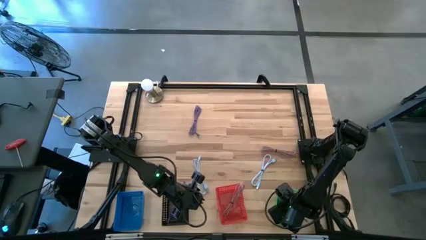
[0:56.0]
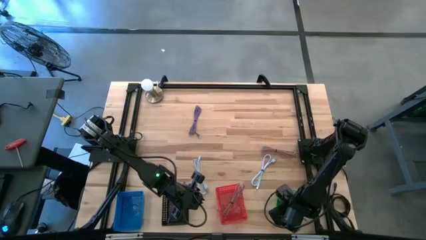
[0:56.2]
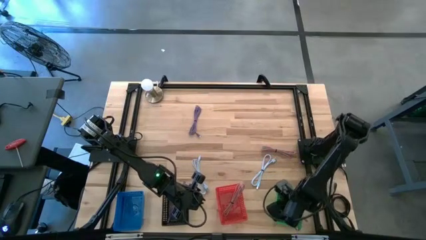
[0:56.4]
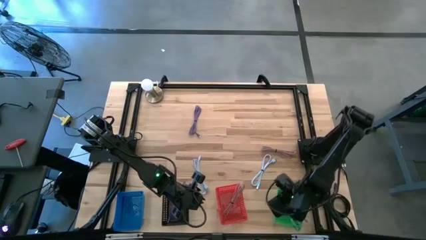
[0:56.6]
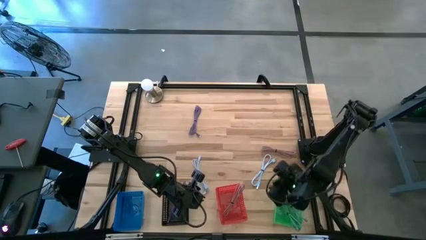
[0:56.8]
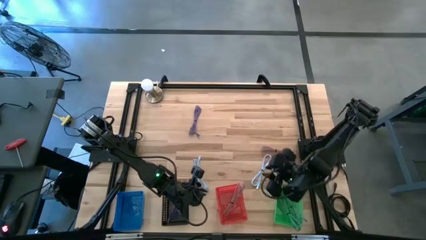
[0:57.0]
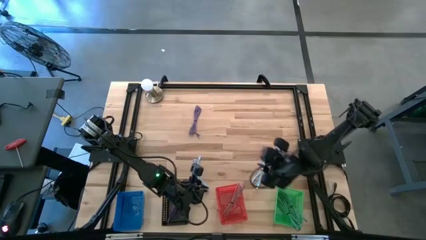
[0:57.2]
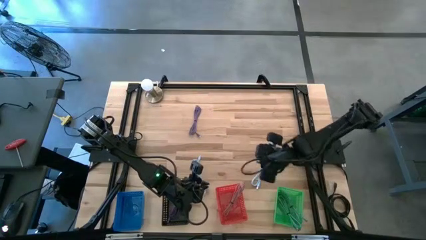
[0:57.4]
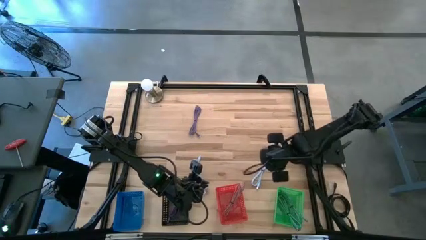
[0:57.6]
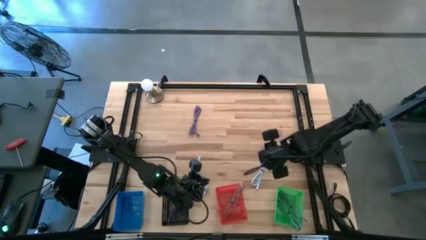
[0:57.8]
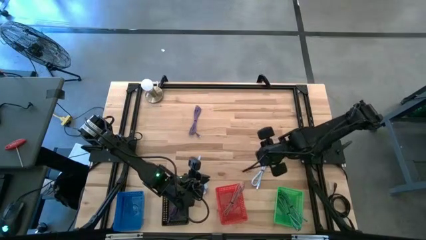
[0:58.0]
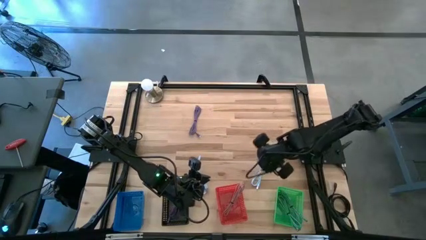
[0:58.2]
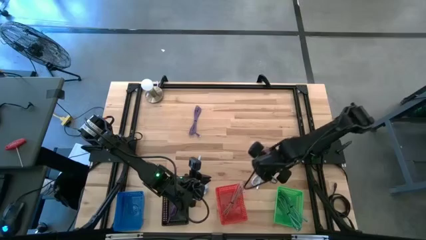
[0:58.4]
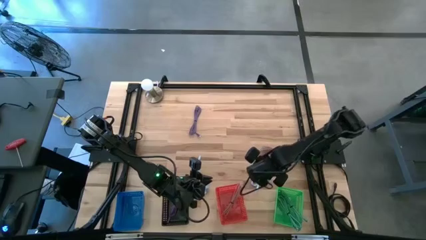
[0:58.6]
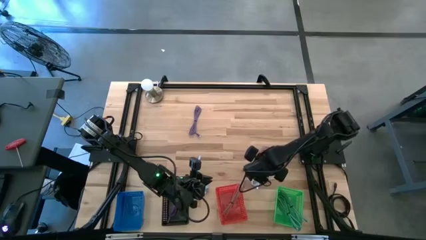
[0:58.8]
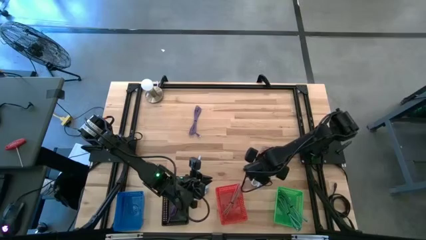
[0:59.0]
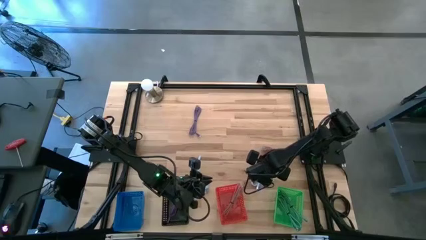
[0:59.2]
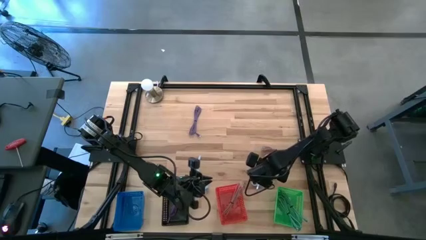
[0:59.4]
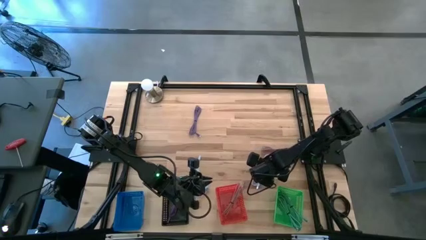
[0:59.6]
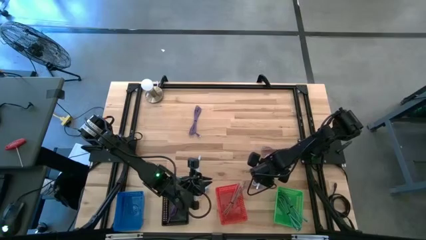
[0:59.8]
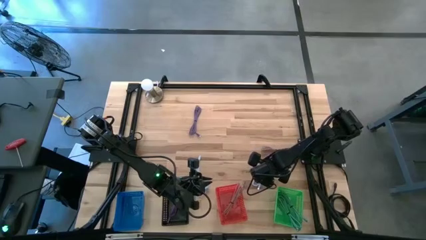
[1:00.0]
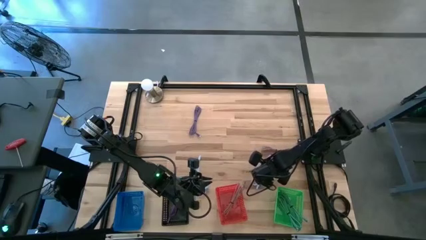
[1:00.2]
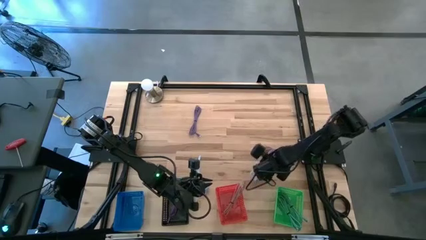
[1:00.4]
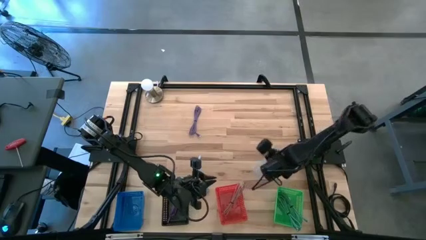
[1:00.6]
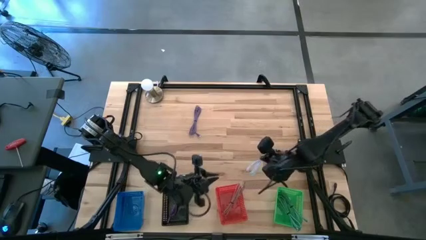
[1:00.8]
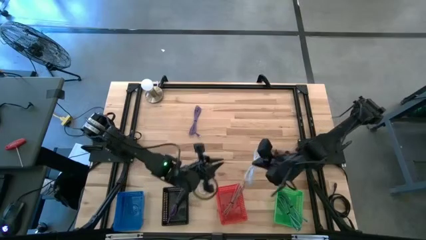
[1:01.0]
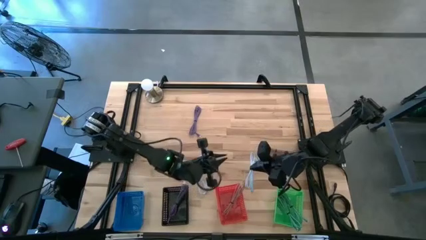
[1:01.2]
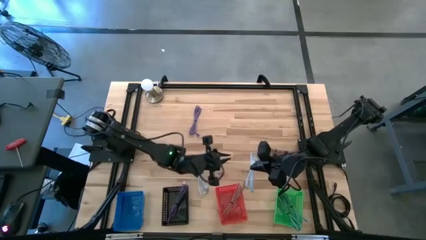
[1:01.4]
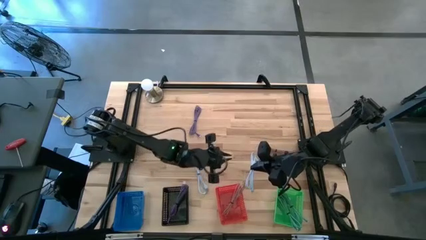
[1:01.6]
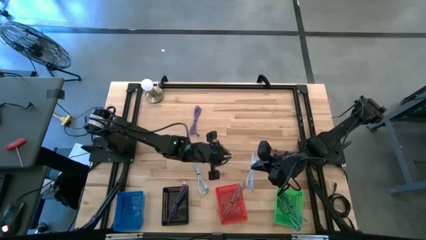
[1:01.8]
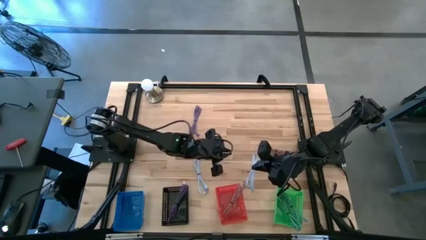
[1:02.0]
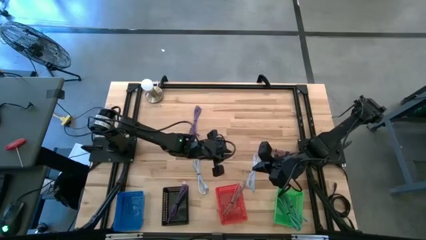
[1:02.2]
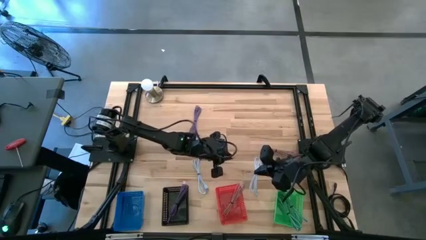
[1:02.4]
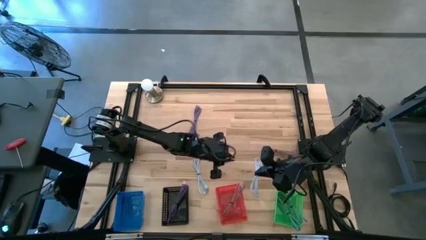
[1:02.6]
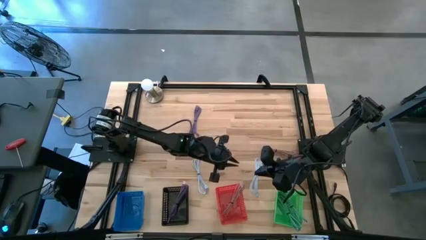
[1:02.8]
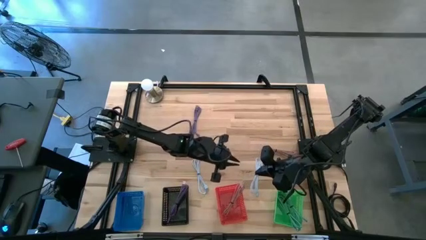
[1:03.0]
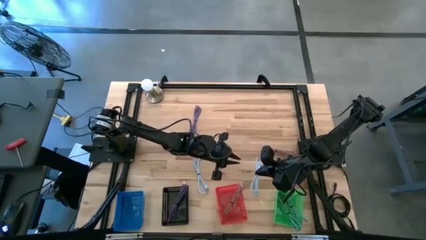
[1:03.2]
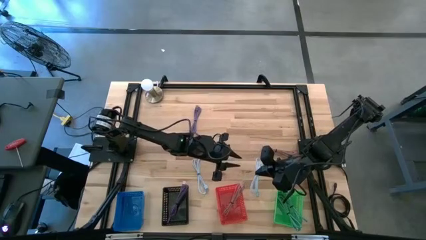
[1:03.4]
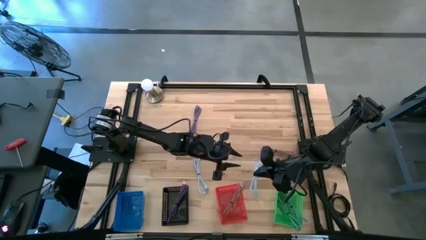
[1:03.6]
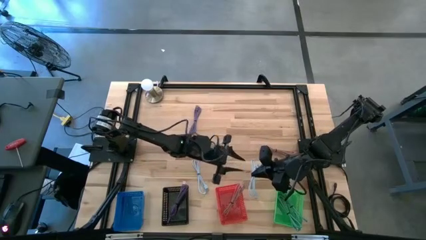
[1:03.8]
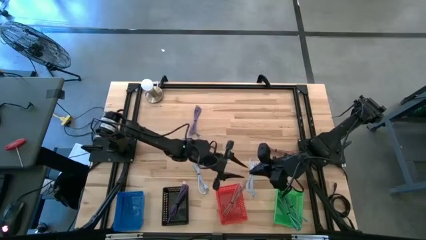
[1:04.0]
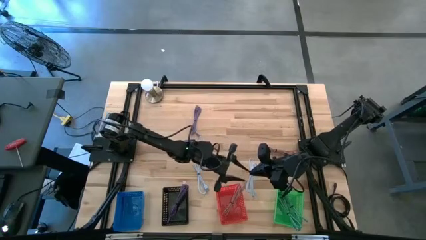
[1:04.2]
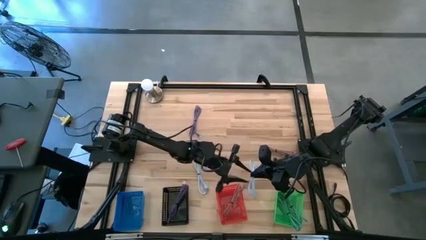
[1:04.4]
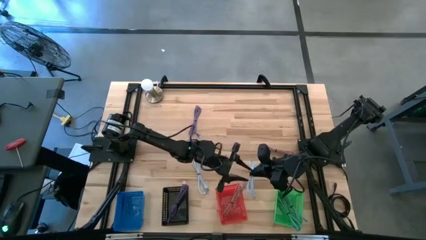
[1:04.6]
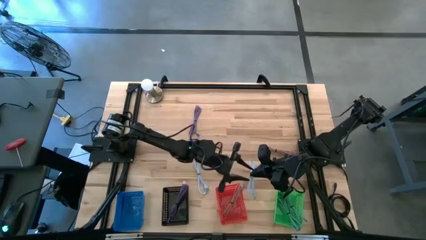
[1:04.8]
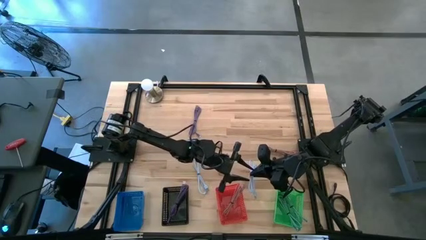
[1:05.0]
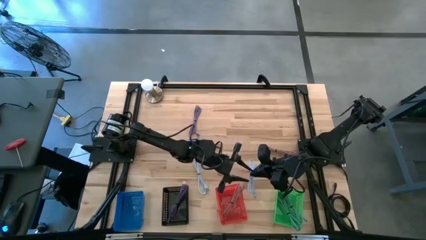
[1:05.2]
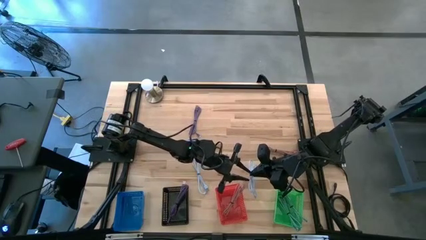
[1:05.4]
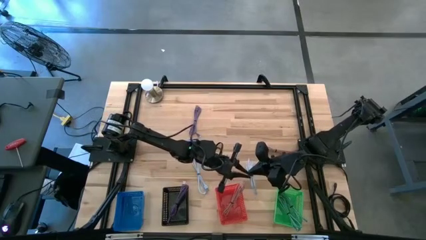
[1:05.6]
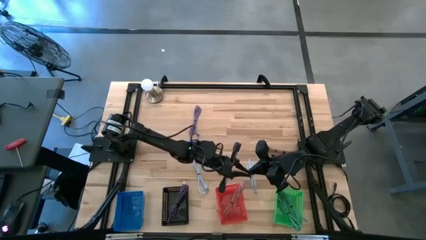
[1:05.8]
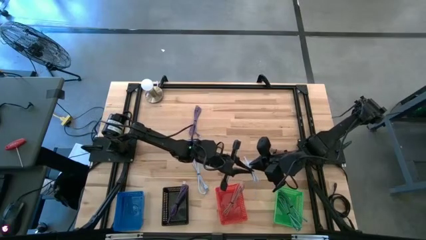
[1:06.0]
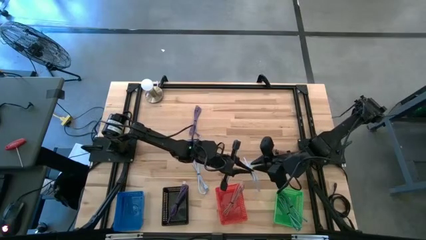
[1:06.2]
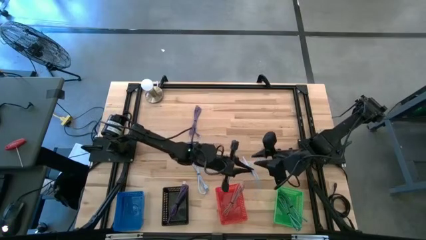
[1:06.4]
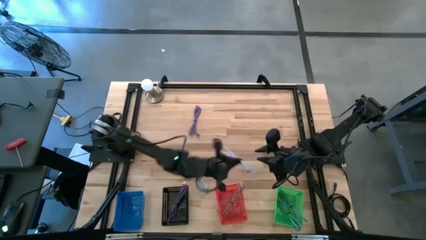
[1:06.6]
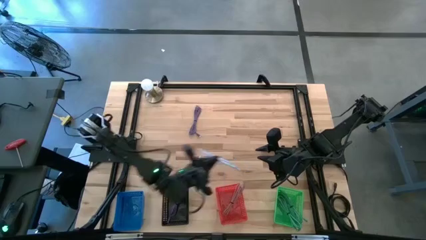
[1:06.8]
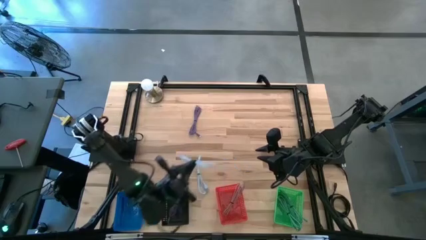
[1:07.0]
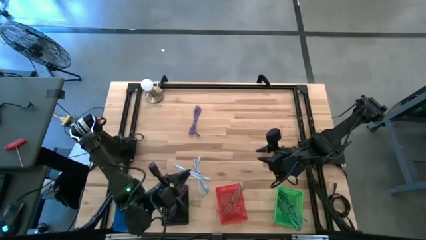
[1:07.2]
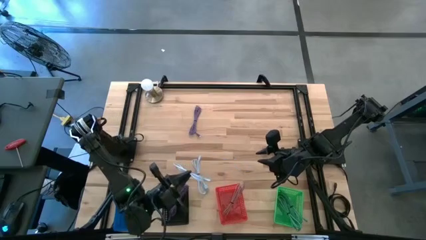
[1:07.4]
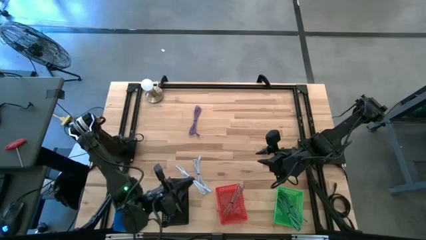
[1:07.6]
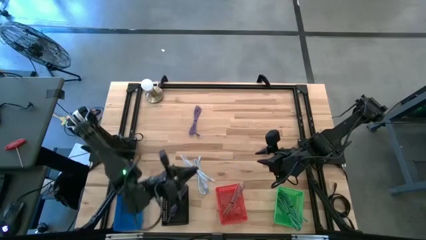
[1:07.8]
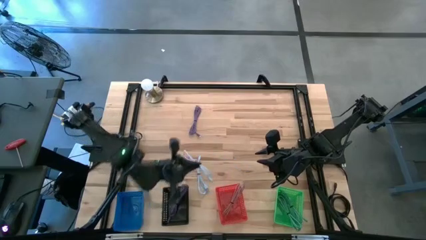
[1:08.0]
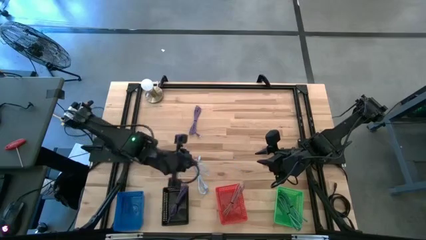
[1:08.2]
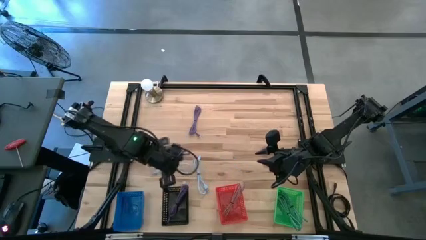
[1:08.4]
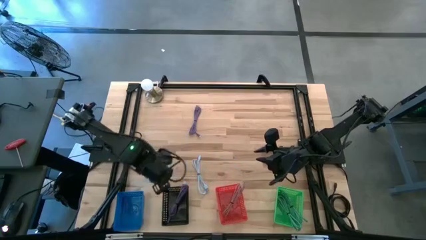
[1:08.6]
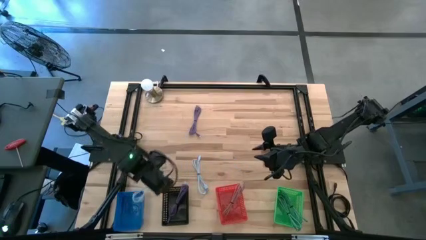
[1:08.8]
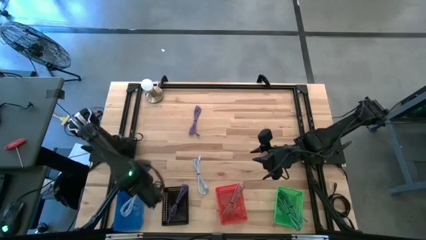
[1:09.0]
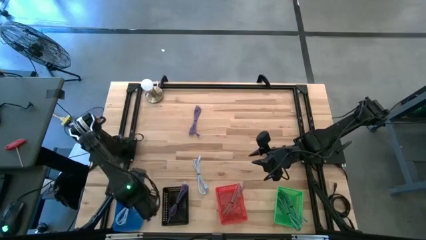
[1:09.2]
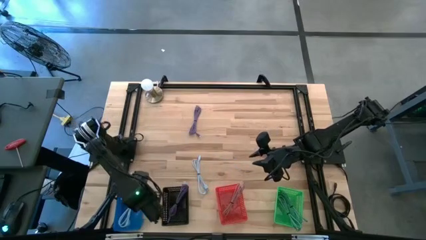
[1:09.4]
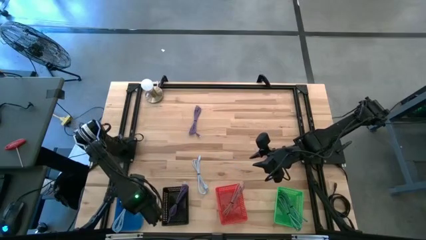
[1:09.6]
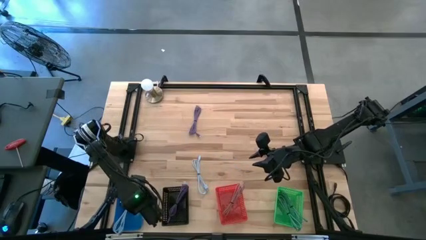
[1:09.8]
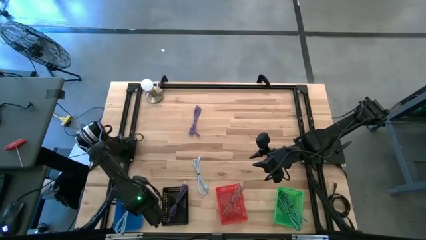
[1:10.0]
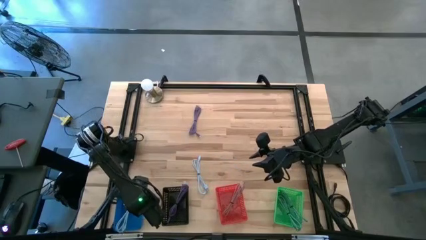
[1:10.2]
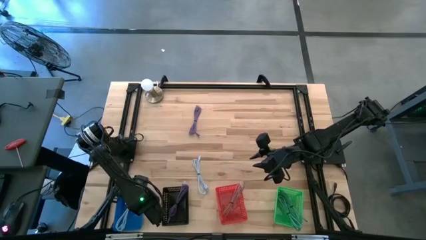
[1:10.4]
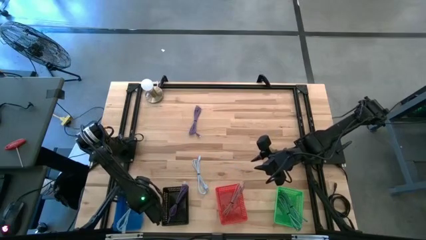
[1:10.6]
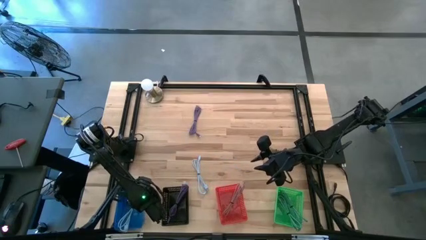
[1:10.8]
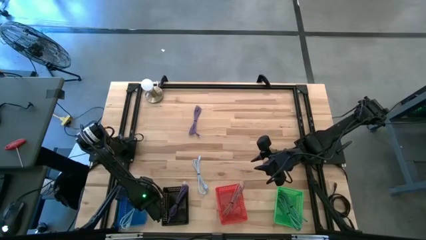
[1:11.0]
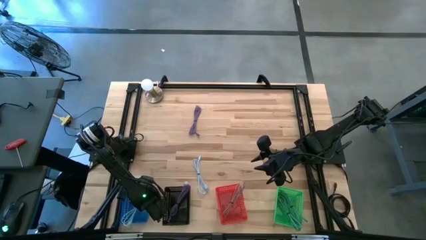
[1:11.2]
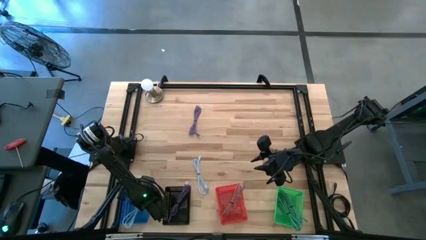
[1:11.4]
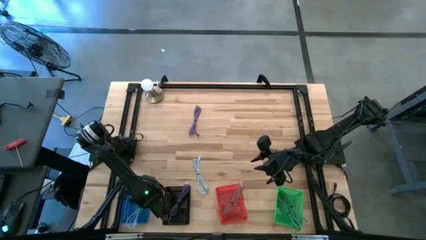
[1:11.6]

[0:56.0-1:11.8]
Task: Pick & Place USB Port
Put the right white charger cable into the blue bin

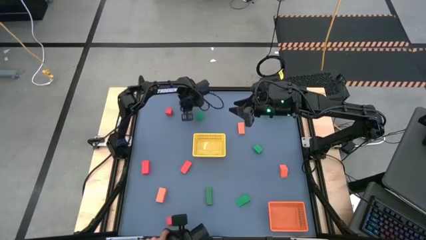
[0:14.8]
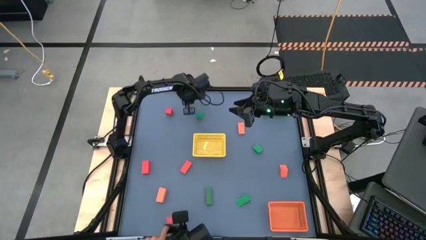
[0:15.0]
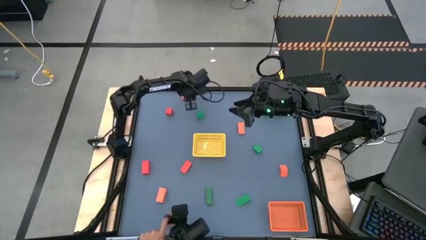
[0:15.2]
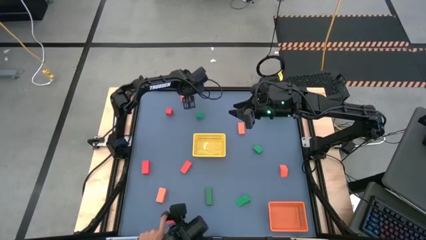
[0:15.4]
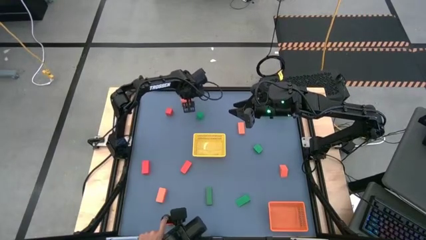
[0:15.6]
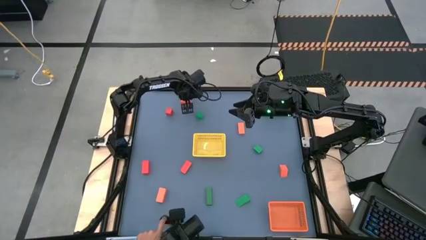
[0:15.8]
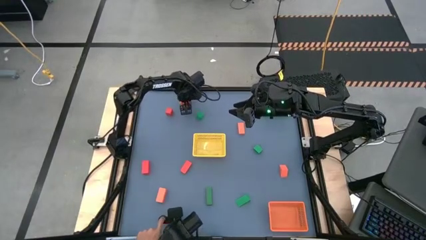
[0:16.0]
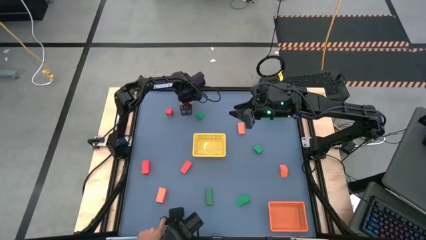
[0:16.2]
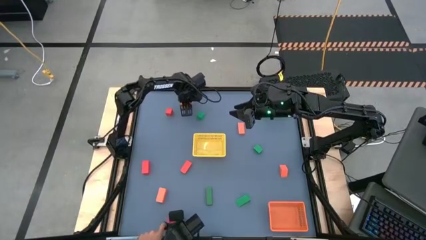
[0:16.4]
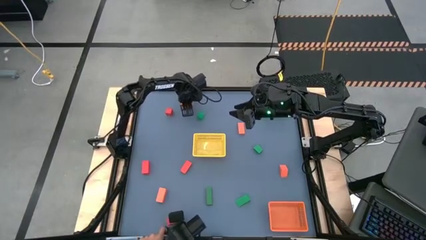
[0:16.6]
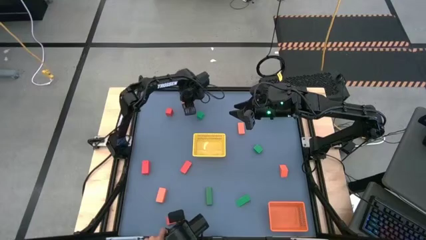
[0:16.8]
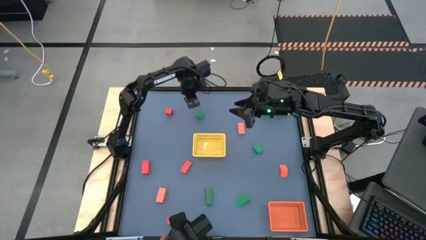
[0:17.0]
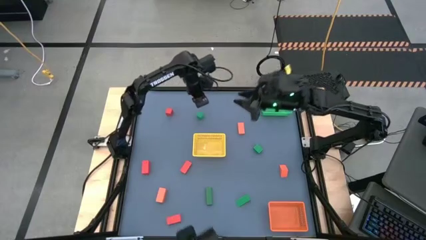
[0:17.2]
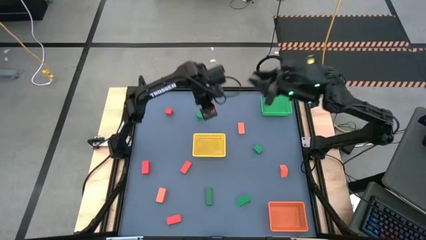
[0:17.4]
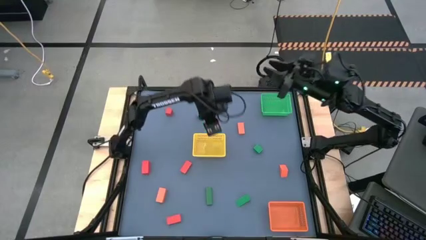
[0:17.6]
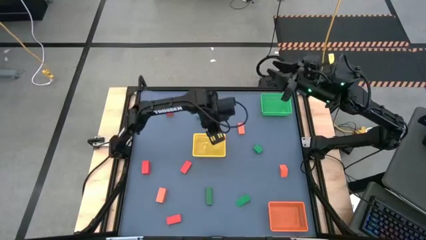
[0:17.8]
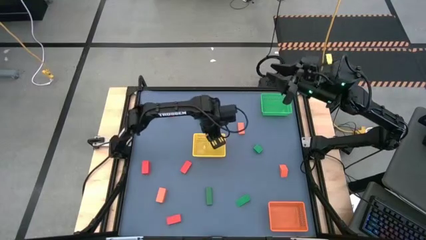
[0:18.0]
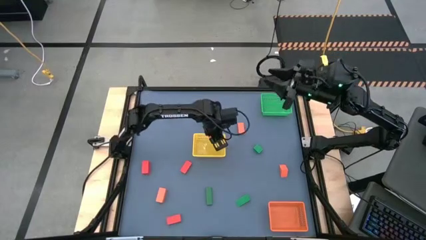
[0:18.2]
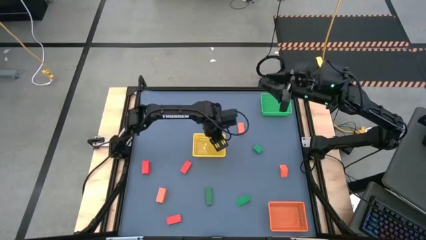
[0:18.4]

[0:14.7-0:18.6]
Task: Sort & place blocks by color
Put the orange block into the yellow basket
